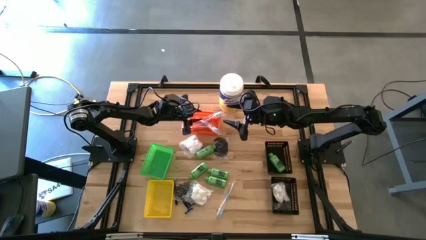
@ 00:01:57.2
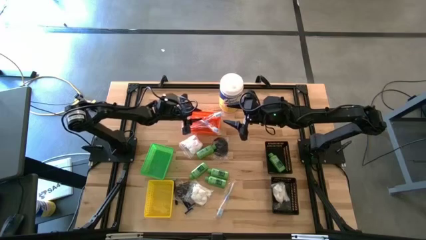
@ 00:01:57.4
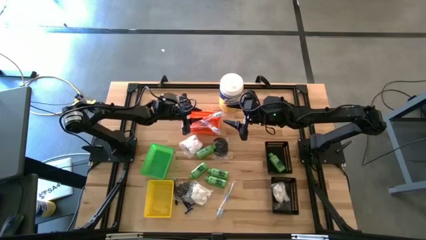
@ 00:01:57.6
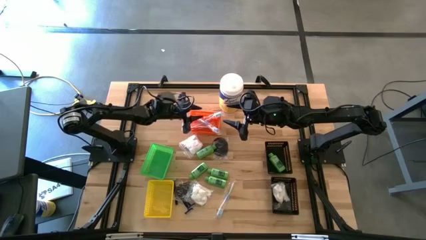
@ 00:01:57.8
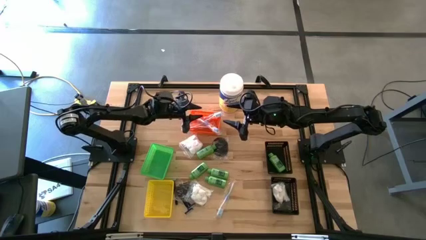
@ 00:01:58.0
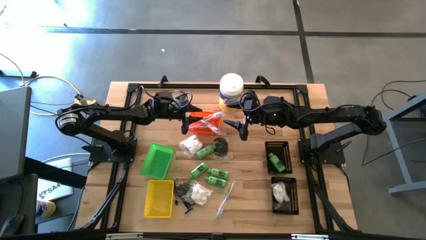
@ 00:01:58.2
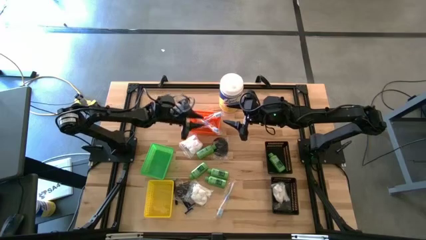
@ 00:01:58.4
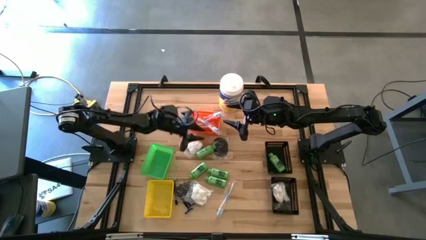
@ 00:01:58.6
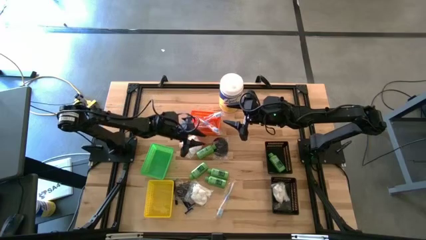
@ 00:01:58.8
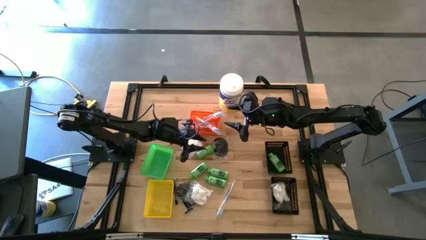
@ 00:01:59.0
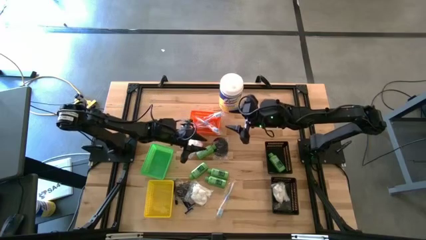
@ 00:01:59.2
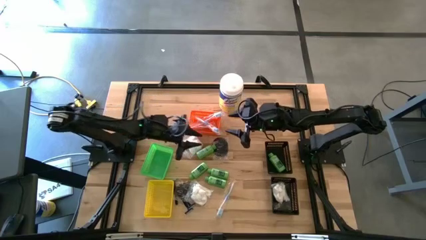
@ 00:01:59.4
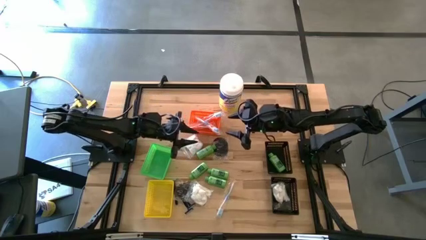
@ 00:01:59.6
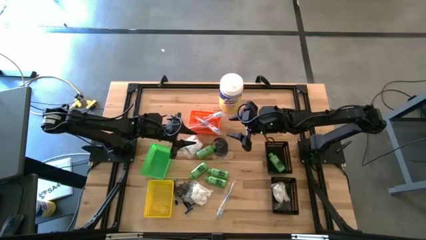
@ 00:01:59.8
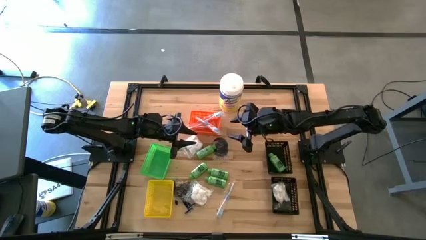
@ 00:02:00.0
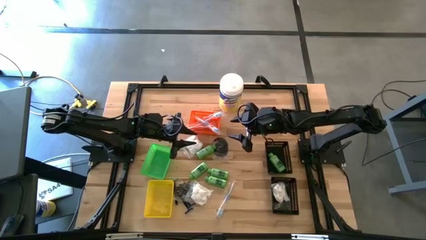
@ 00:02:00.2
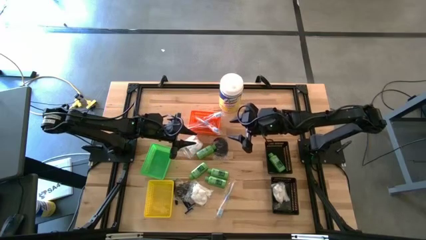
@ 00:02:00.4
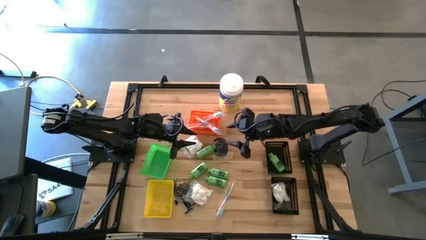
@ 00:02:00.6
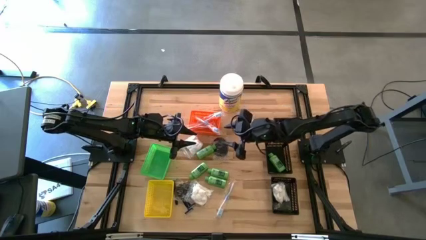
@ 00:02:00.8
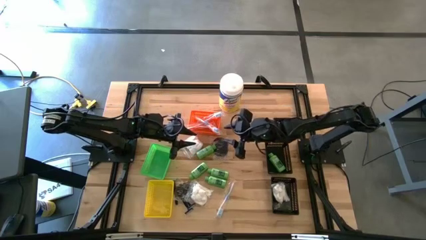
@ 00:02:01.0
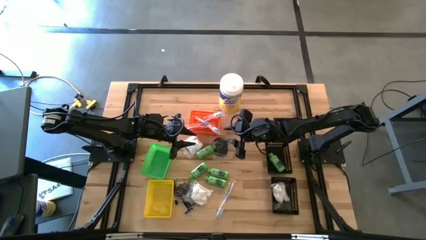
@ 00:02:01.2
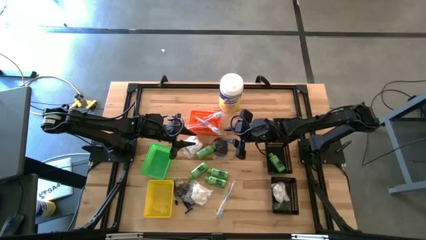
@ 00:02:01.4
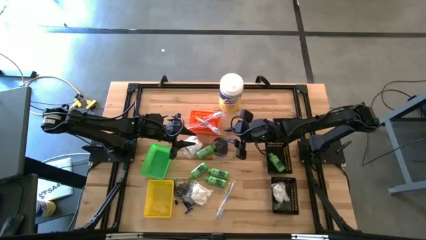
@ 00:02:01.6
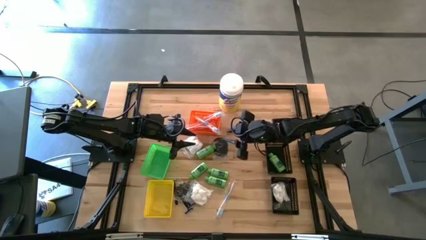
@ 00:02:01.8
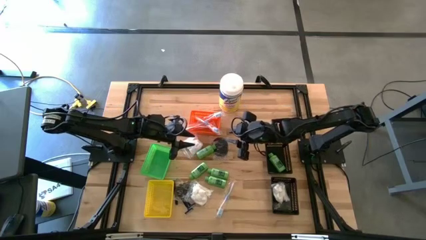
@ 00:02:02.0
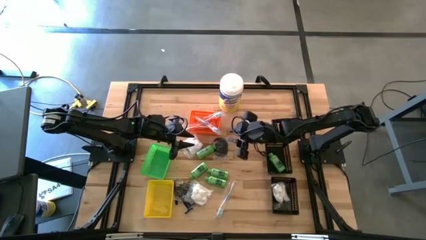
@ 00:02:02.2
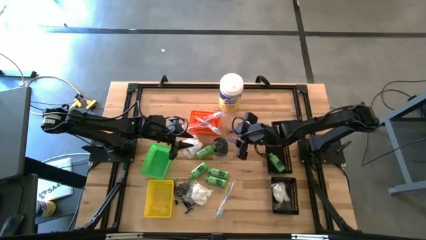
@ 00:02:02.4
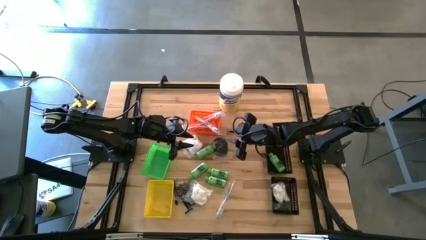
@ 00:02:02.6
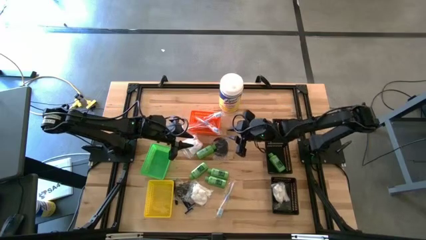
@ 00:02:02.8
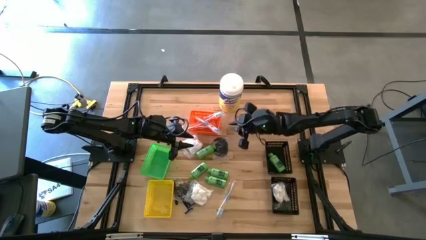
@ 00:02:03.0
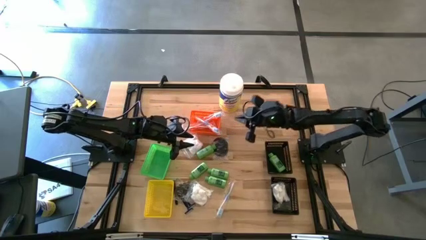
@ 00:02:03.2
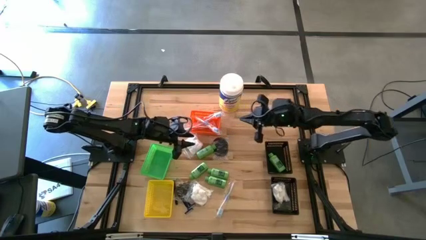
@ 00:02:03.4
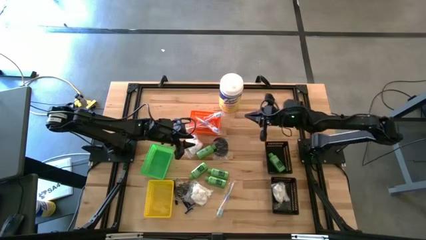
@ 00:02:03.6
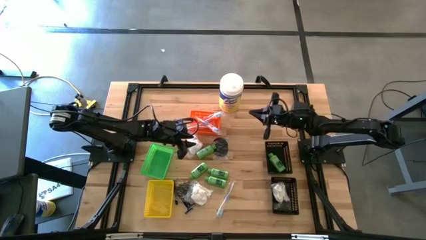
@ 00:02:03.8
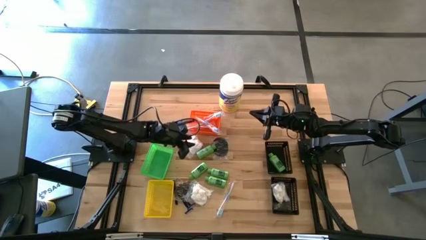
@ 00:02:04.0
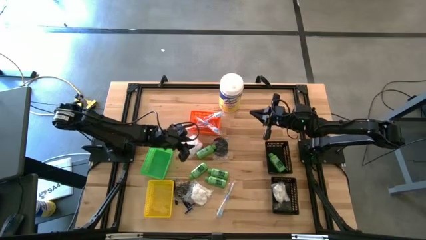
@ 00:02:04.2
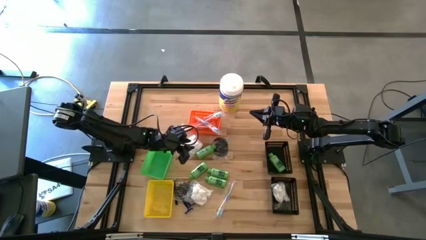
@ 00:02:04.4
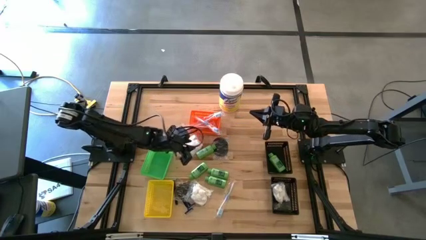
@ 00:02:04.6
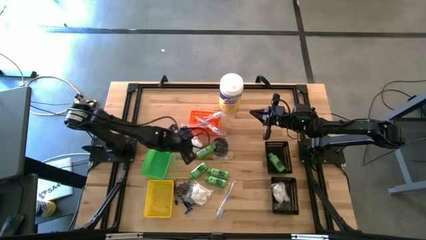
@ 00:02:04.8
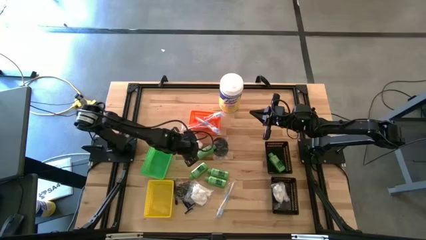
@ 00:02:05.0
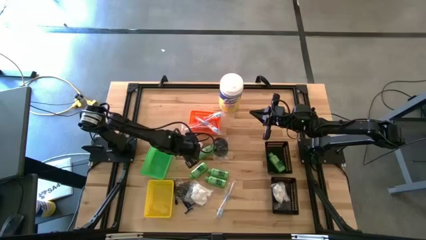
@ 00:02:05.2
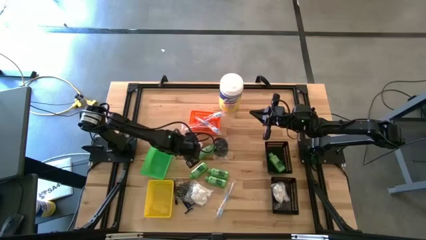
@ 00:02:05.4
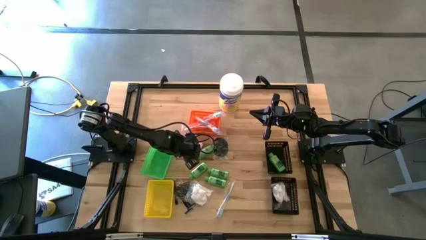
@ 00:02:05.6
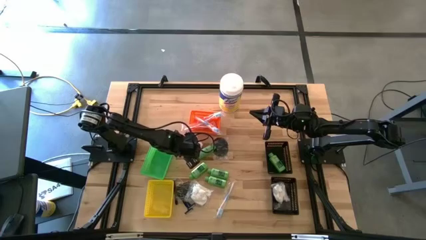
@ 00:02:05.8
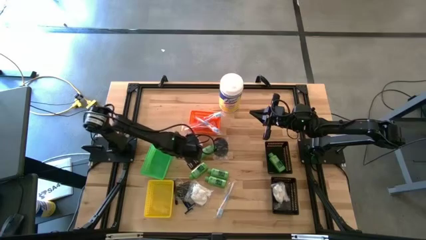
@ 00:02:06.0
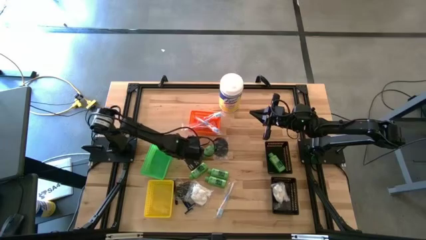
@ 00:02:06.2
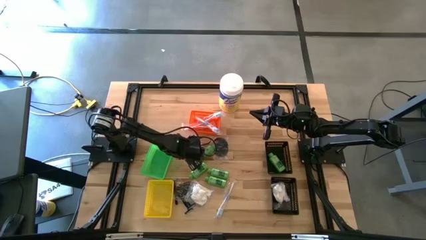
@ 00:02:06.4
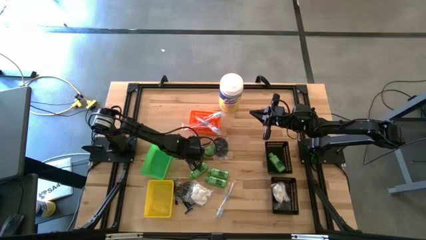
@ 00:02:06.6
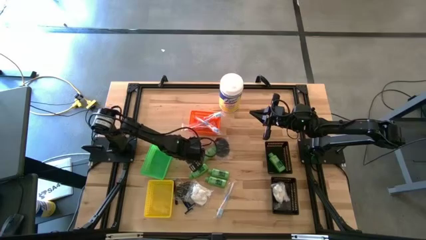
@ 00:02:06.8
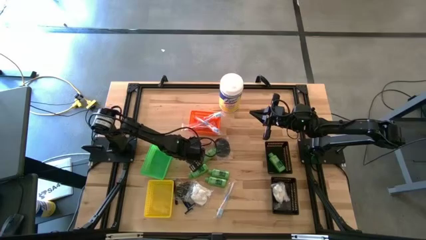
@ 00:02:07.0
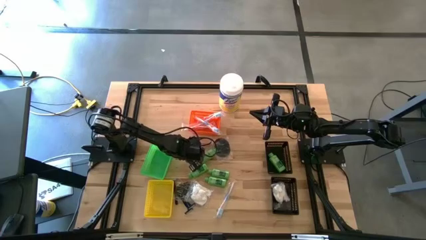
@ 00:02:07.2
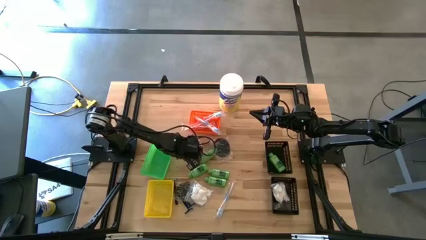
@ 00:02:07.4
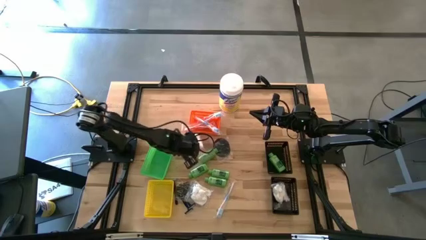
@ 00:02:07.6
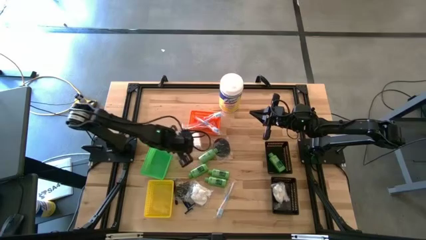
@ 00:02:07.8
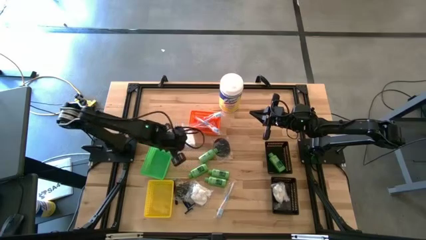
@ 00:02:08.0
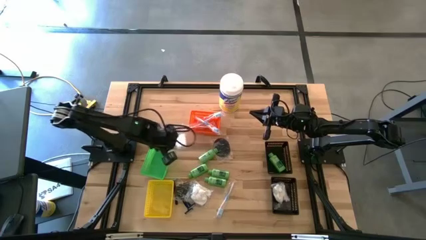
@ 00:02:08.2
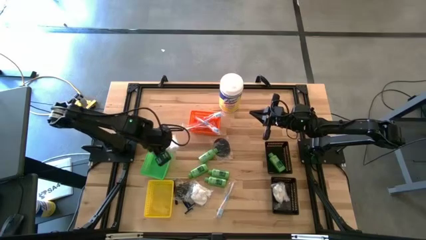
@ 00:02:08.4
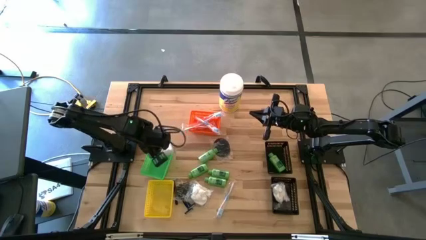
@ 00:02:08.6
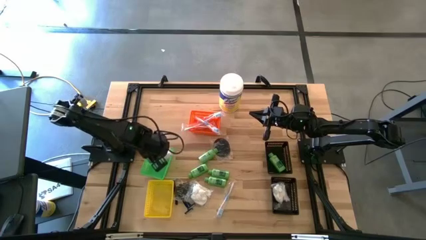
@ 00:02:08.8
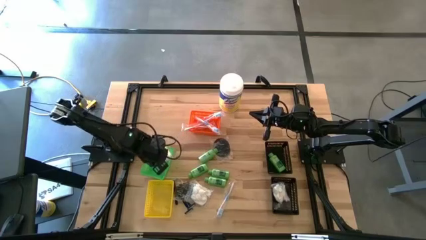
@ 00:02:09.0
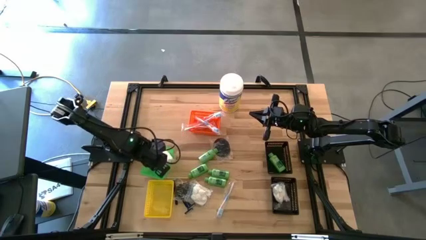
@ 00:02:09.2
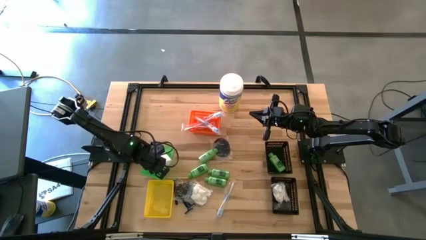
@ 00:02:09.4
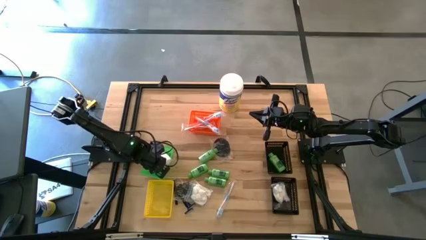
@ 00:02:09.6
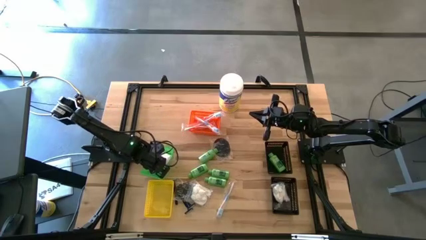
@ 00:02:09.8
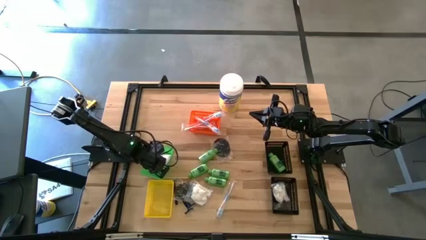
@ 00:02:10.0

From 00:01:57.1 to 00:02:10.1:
Task: Pick & Place Travel size toiletries
Put the white cotton pack into the bottom black bin

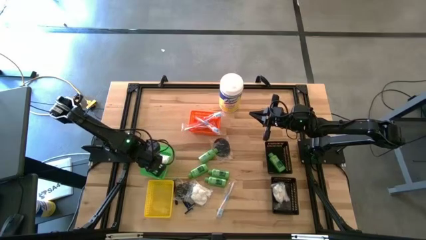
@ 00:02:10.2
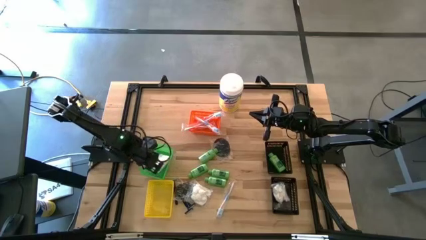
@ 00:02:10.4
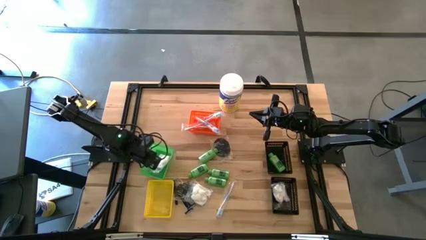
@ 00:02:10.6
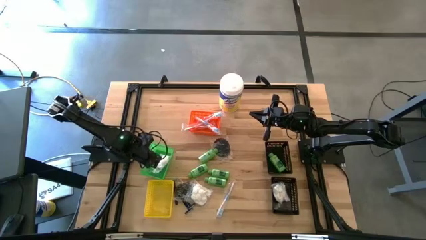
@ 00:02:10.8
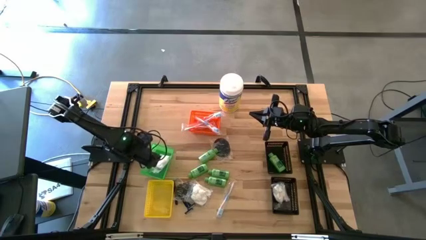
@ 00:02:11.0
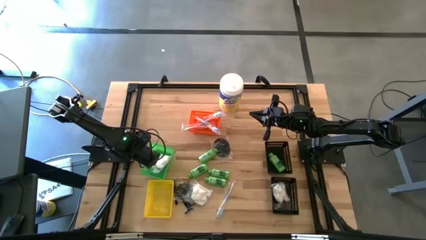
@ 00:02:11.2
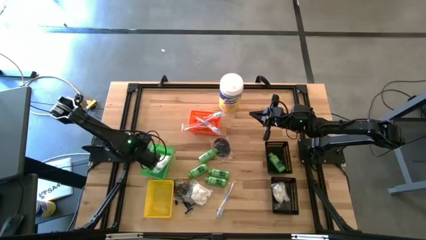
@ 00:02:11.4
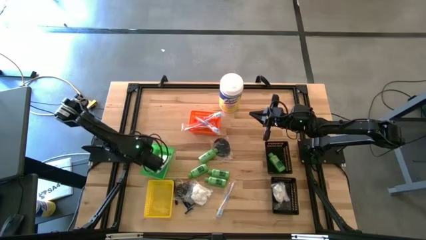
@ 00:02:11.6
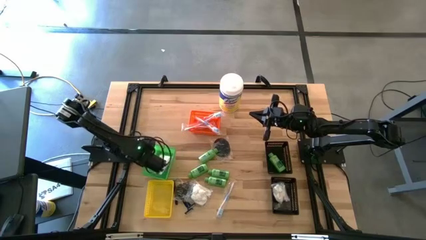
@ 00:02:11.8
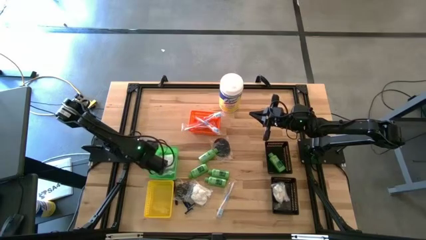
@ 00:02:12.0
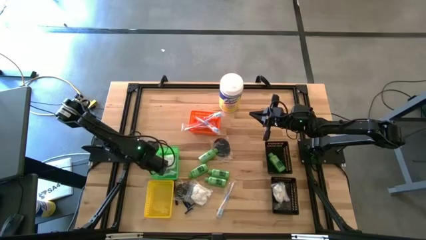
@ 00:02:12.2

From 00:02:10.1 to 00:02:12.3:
Adjust the green bin on the table
